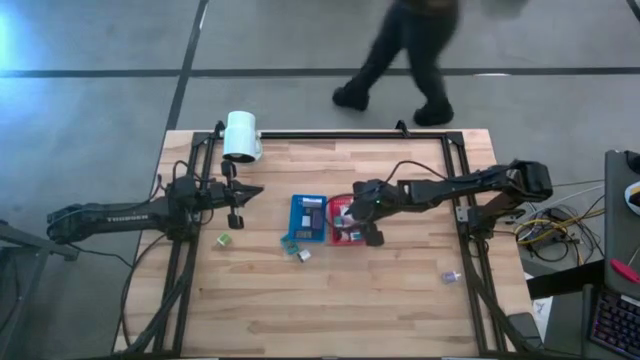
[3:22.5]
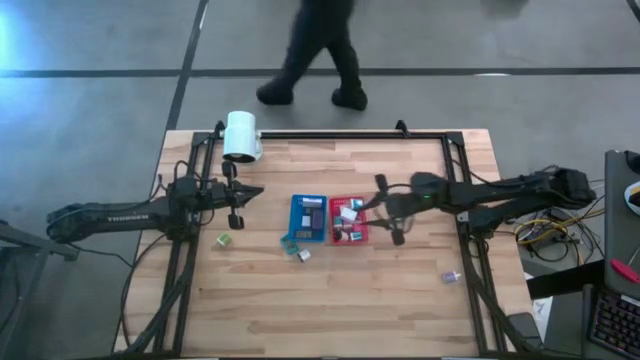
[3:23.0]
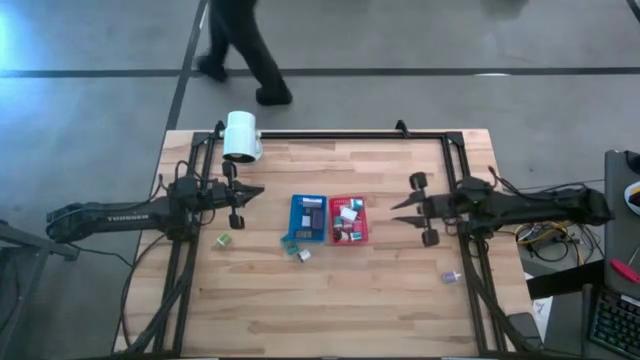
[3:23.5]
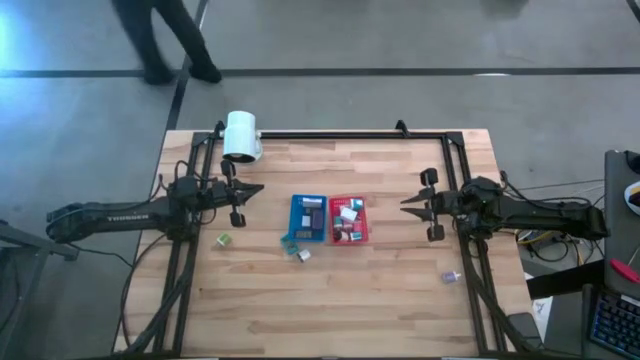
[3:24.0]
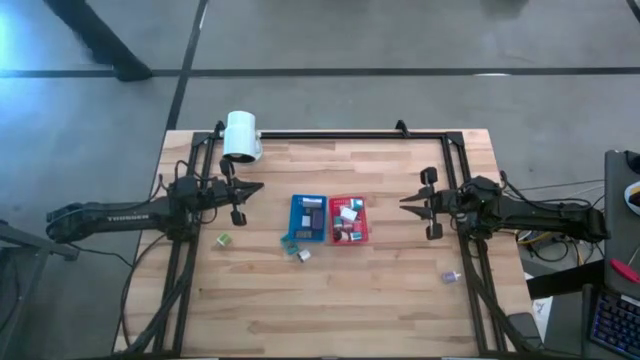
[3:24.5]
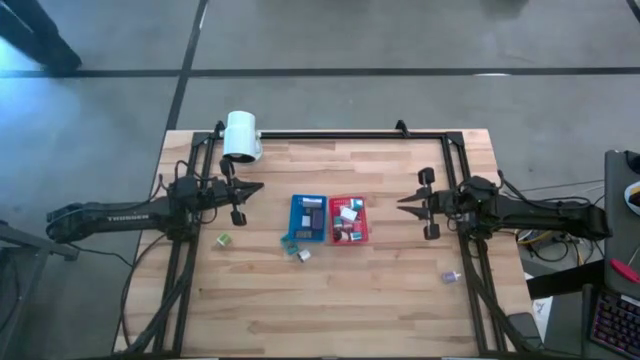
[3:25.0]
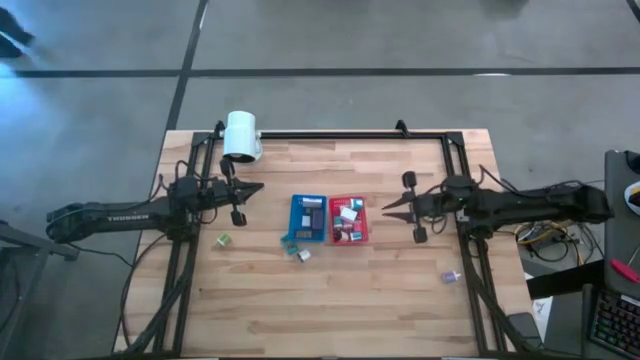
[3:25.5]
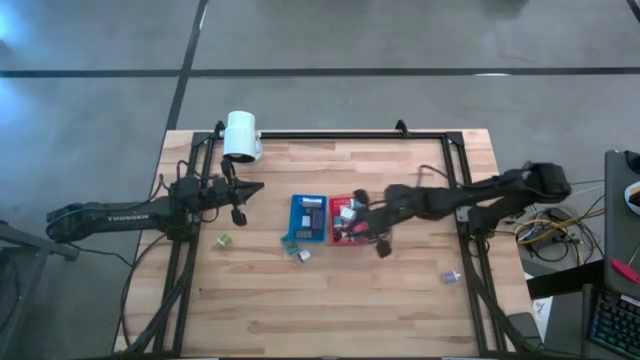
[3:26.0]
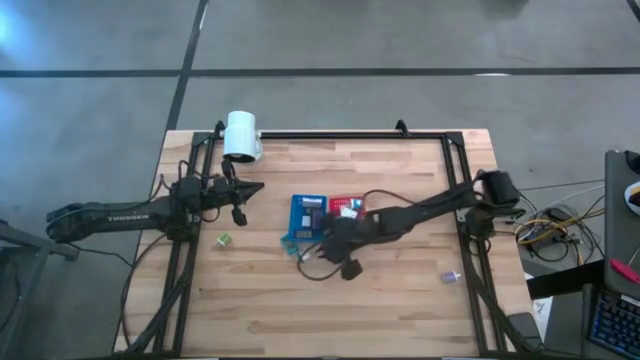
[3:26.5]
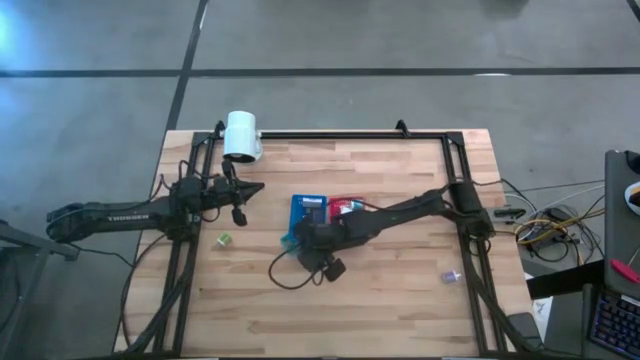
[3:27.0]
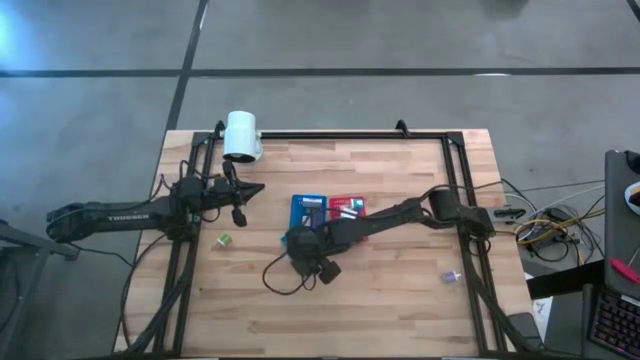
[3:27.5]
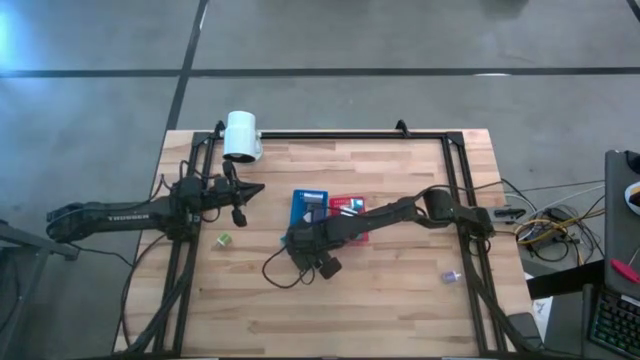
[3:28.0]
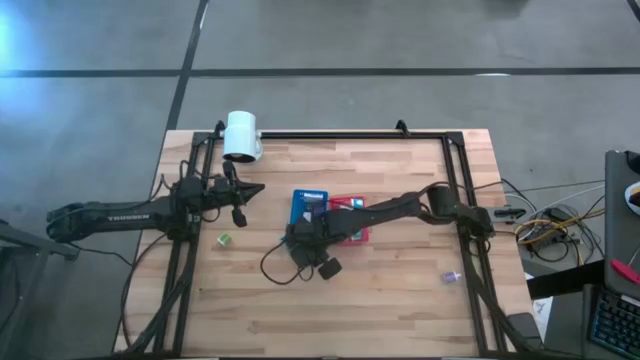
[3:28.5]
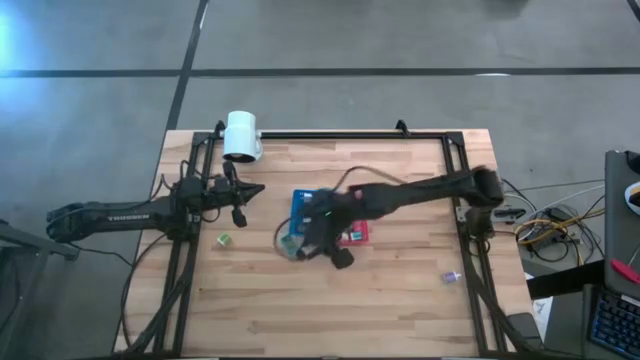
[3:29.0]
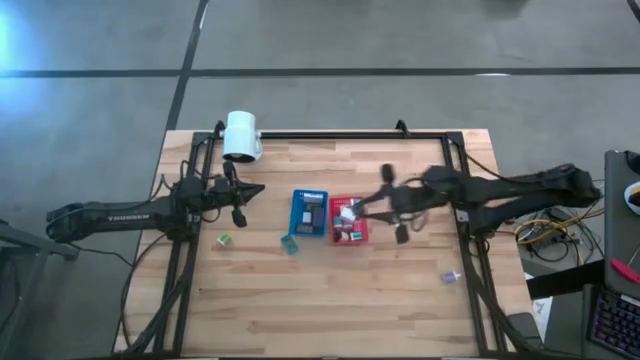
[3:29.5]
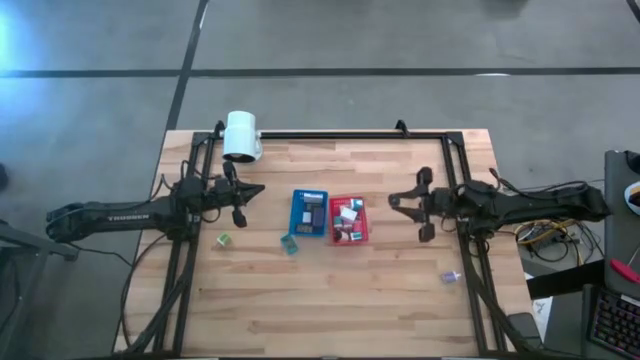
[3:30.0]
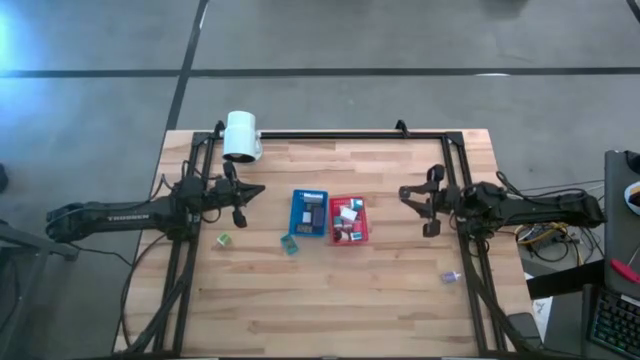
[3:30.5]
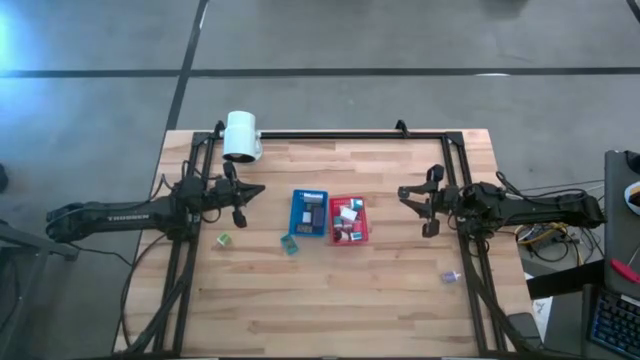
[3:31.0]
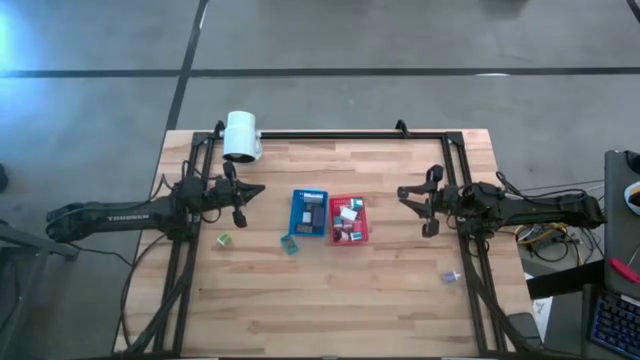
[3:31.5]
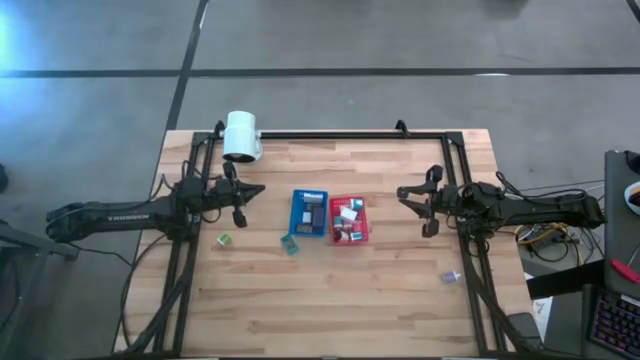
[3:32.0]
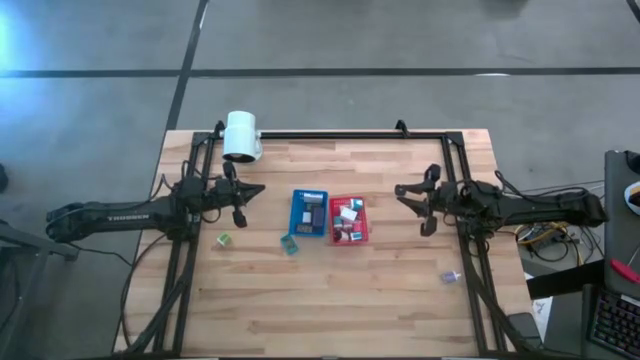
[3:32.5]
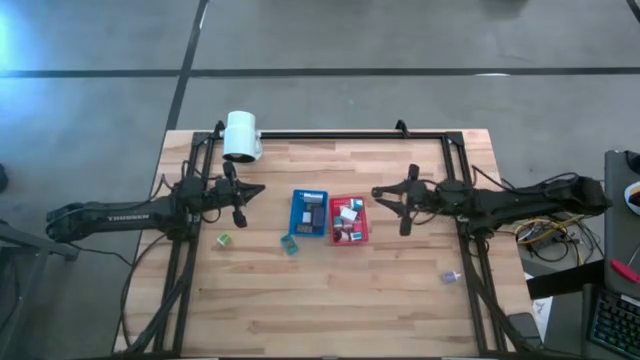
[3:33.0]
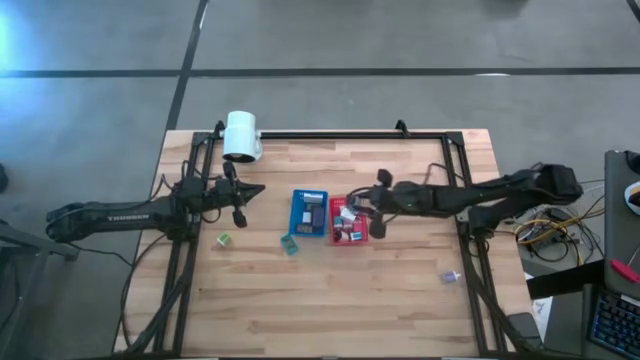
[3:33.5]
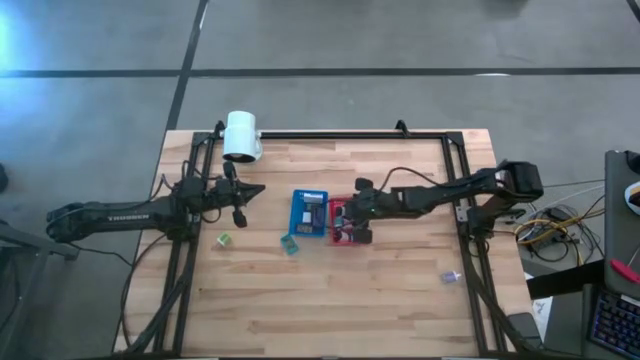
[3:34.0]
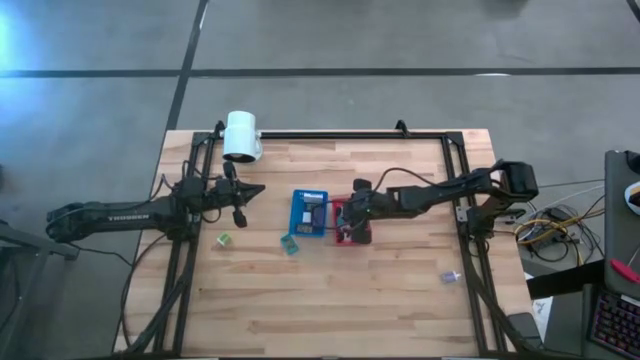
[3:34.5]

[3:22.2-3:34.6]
Task: Pick & Place Office items
Put the black white adaptor into the red bin

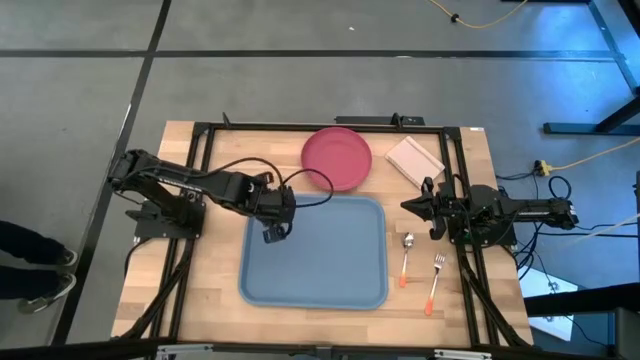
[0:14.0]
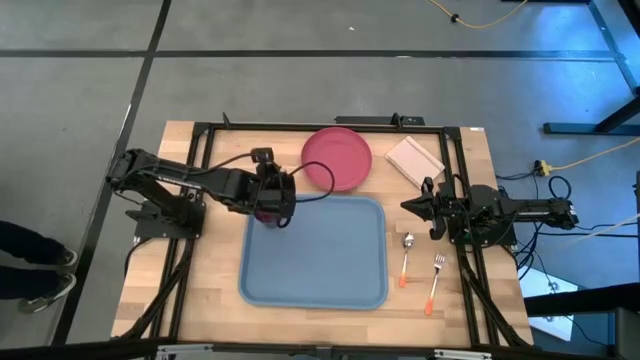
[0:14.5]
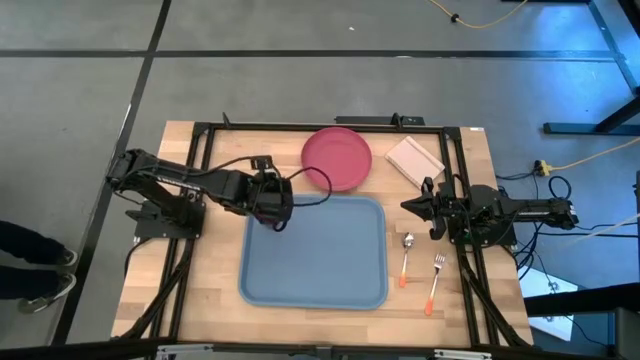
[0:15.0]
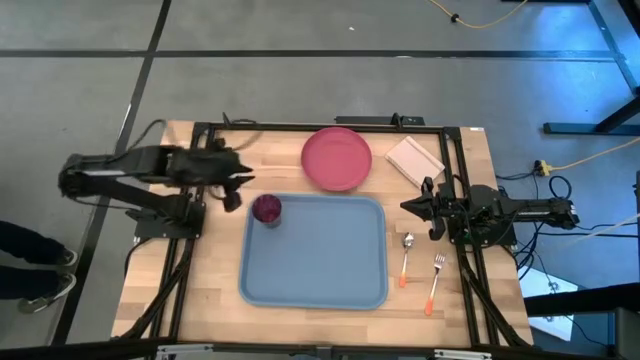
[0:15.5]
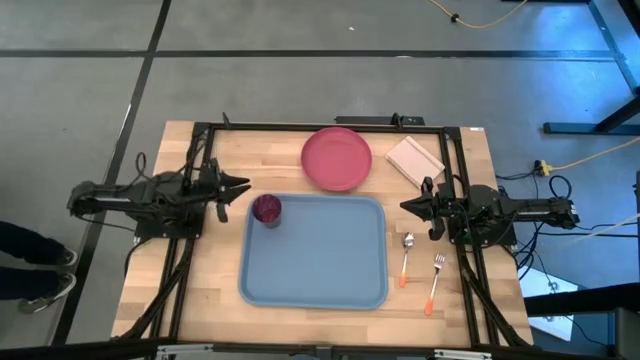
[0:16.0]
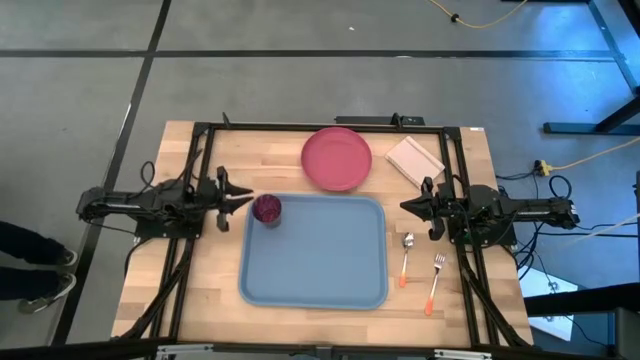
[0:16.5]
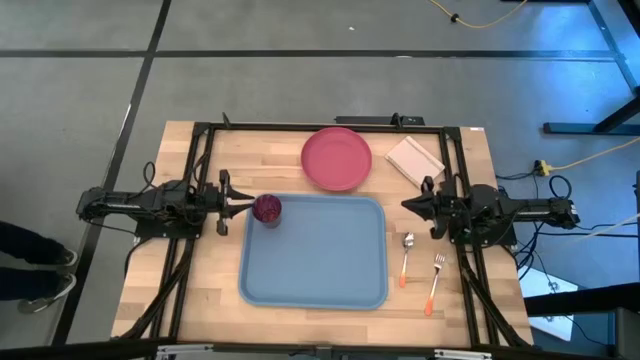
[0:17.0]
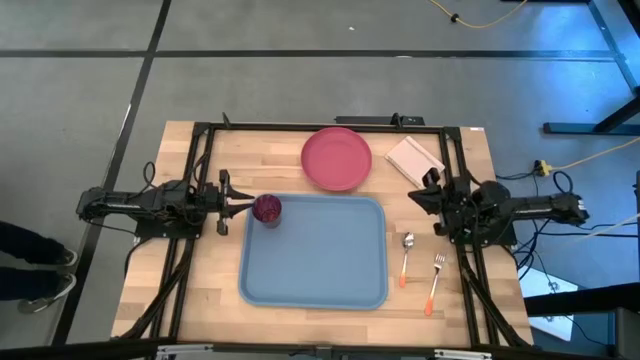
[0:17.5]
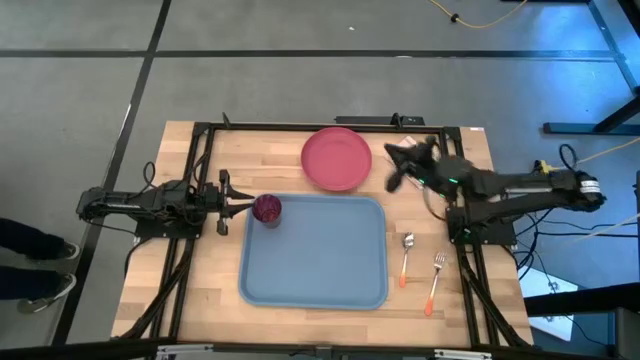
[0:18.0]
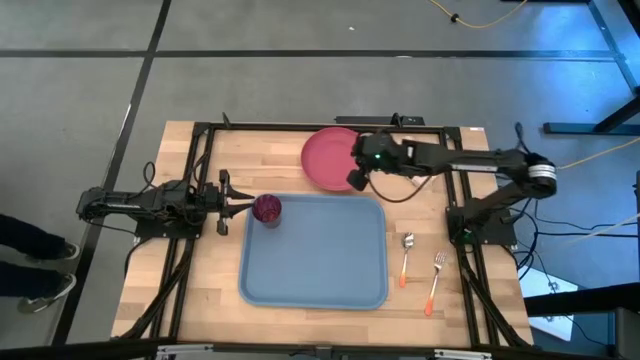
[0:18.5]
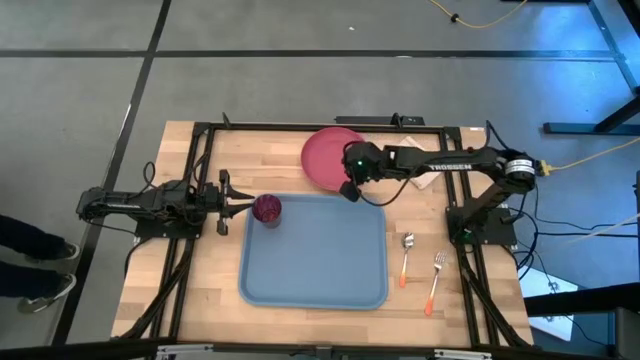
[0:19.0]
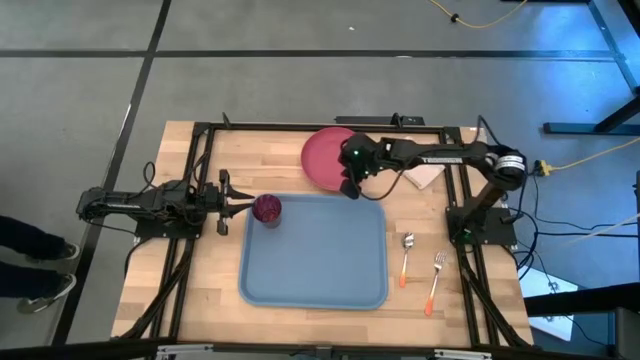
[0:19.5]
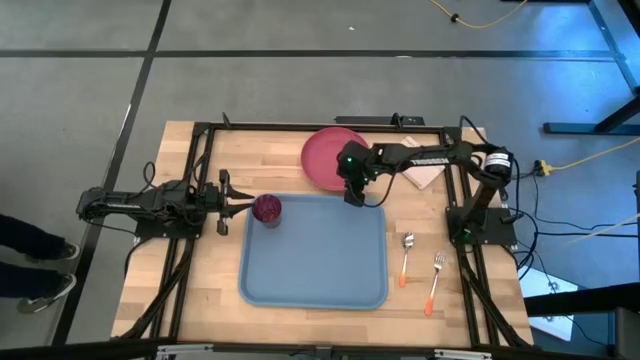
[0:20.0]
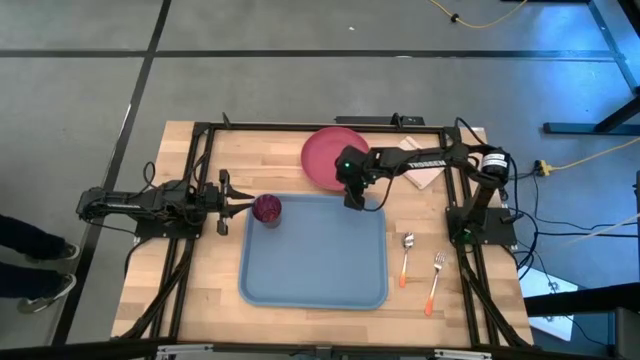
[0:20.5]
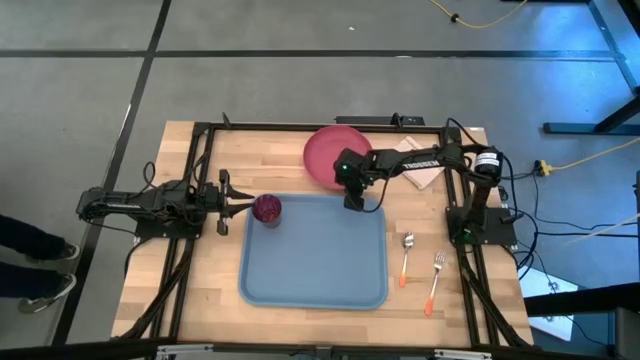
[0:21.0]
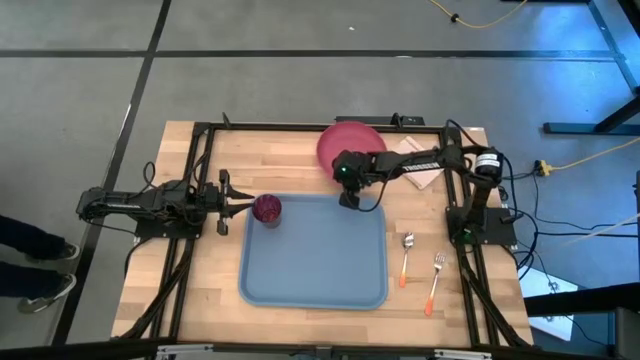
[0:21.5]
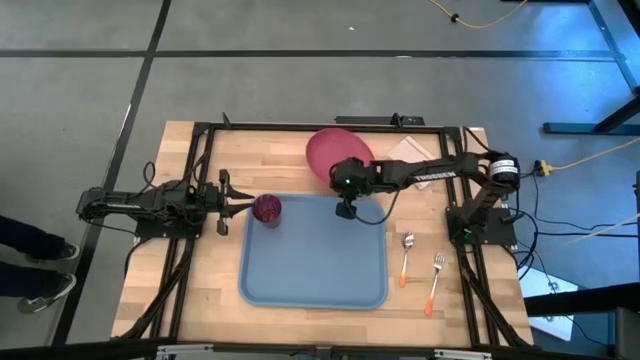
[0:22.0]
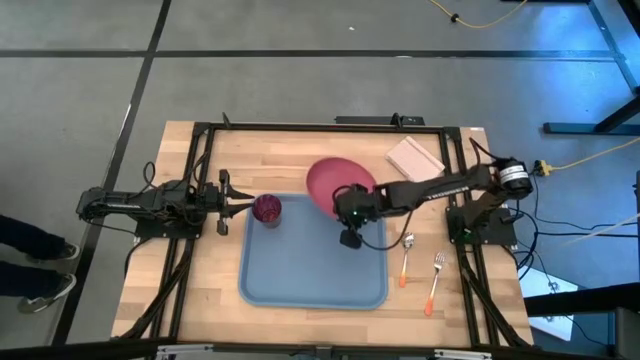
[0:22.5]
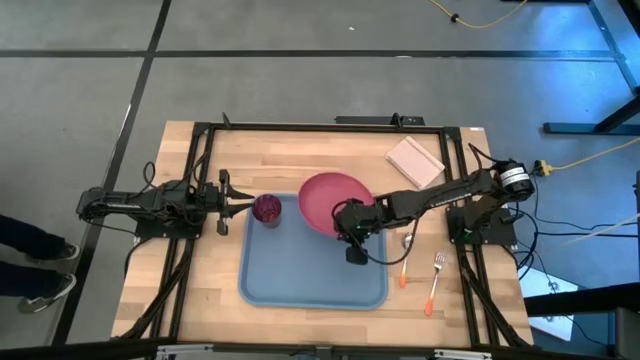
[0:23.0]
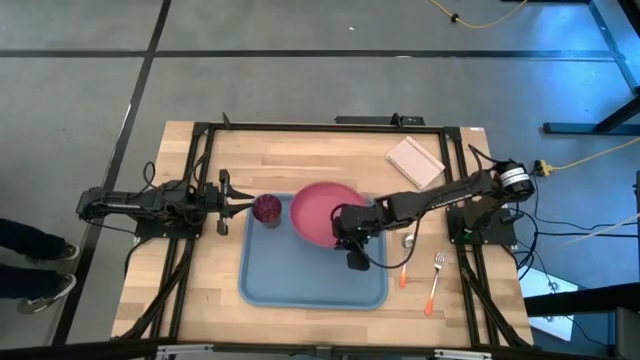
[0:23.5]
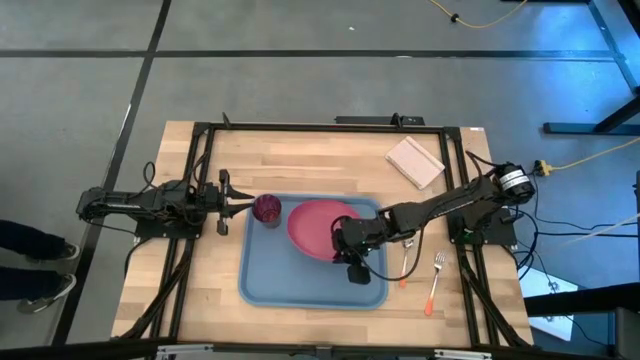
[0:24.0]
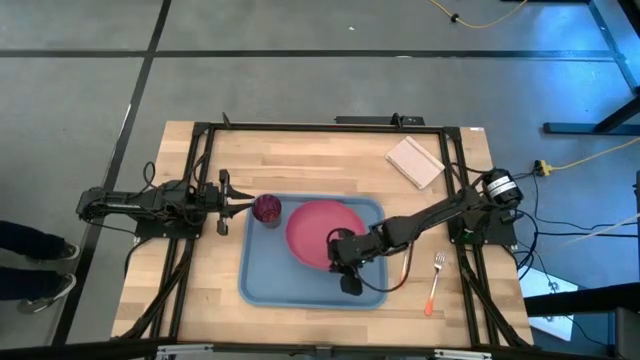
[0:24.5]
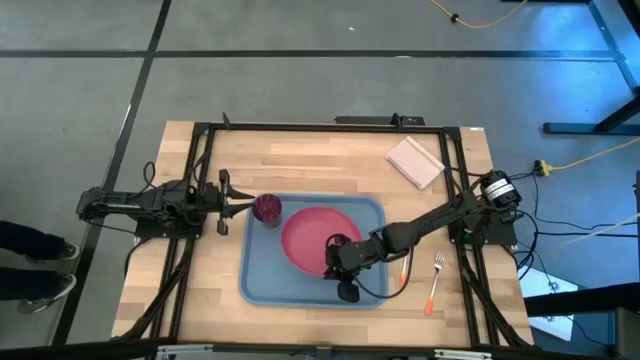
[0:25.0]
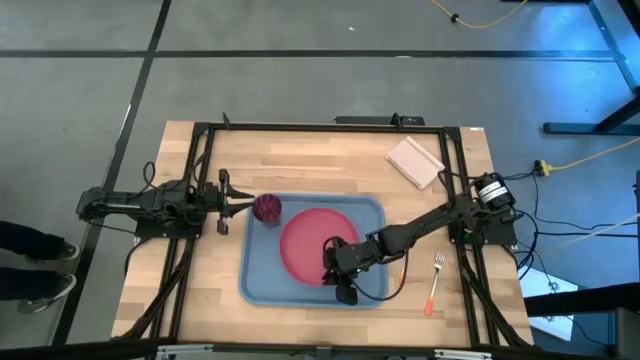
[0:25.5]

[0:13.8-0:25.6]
Task: Pick and place plate/cup/fork/spoon on tray
Put the pink plate on the blue serving tray to the bottom right of the red glass
